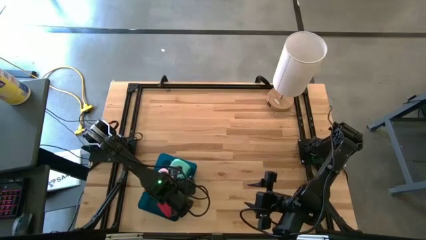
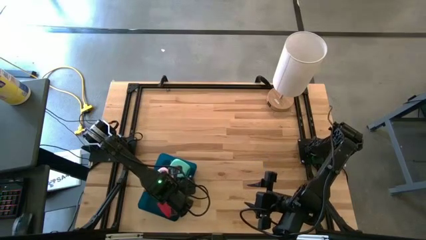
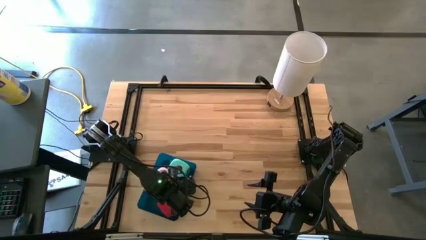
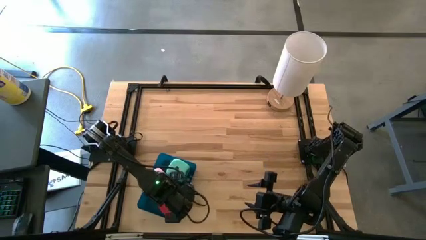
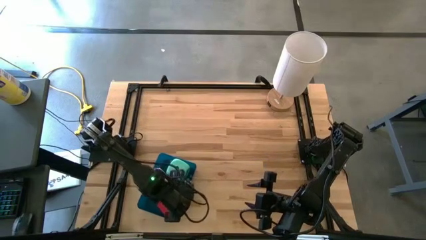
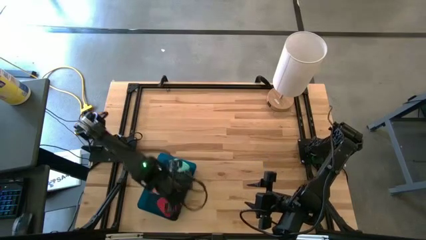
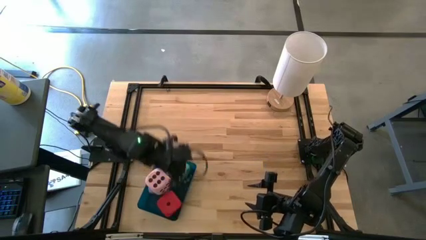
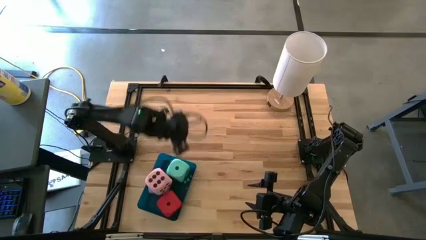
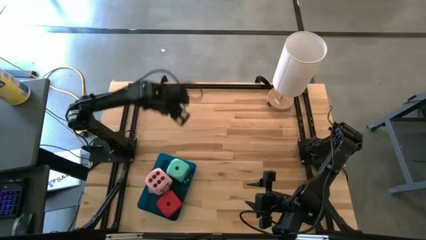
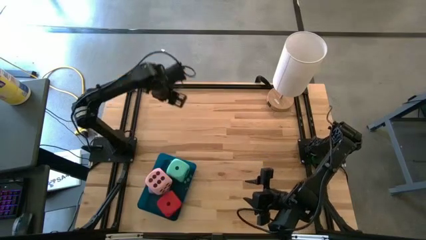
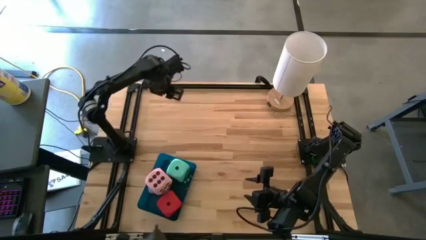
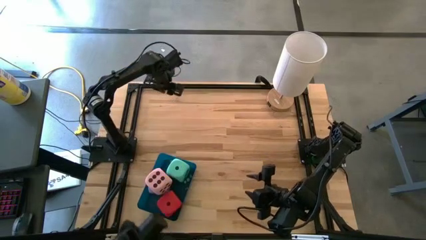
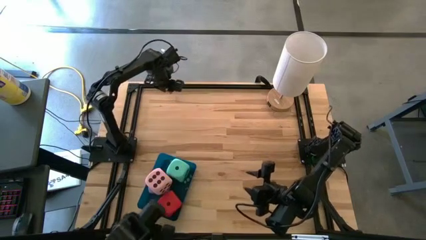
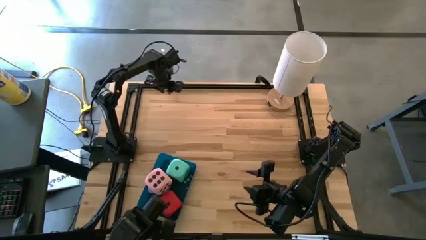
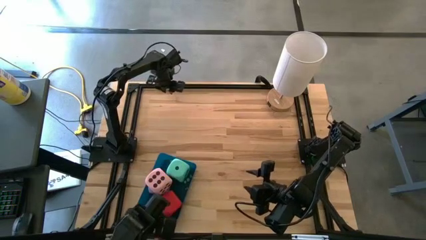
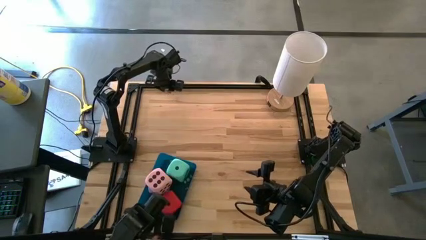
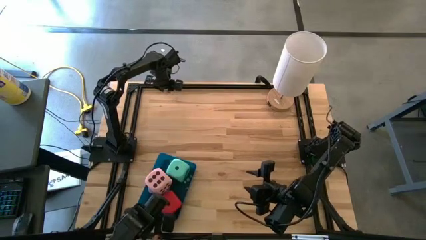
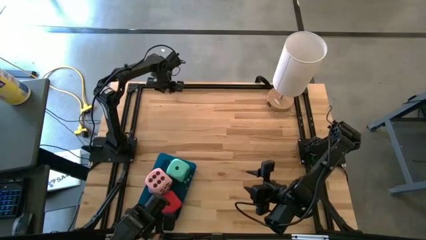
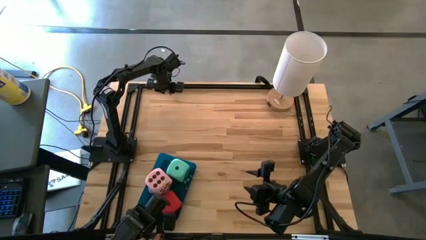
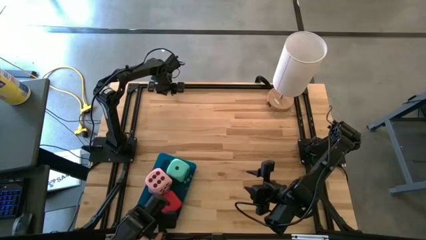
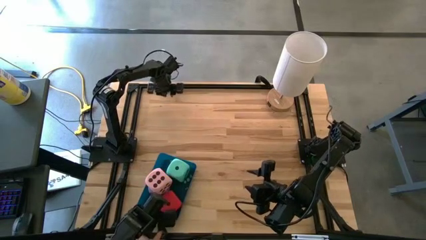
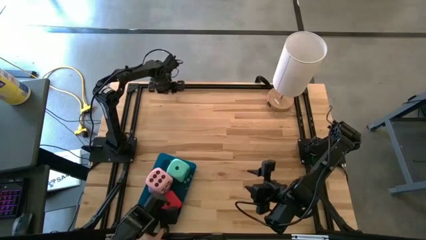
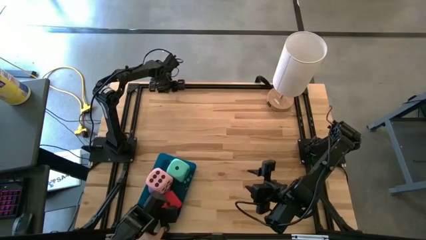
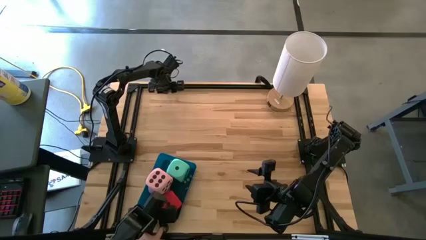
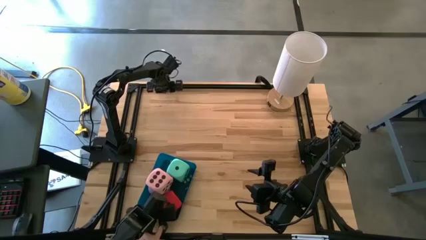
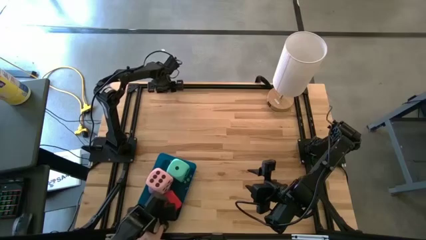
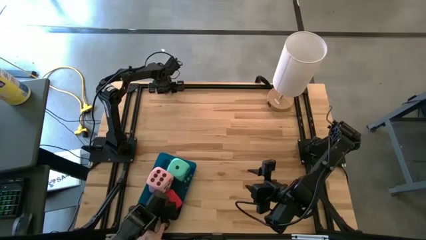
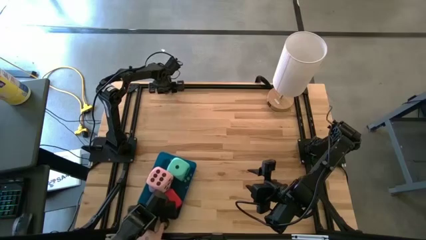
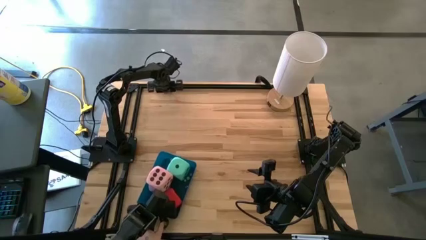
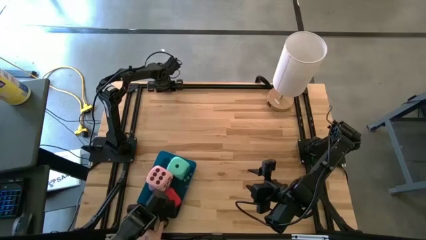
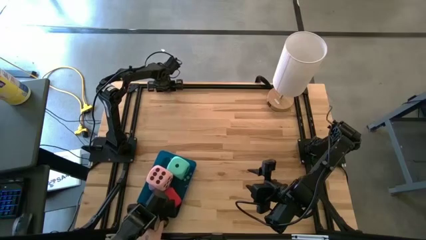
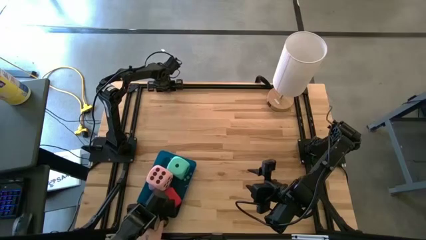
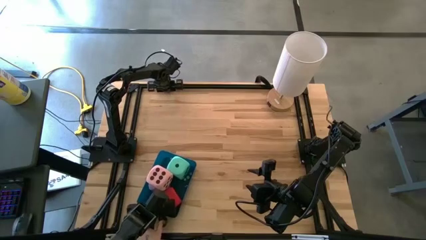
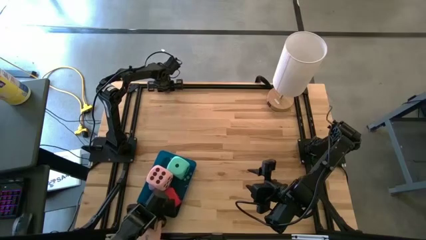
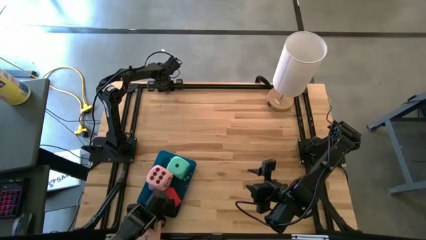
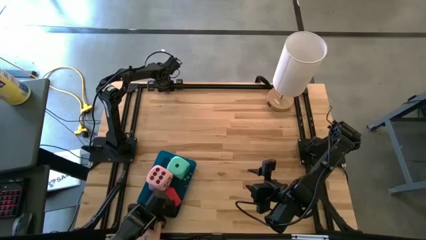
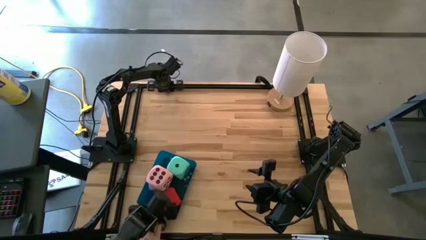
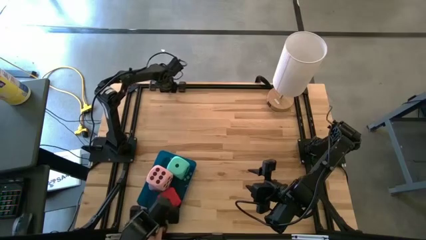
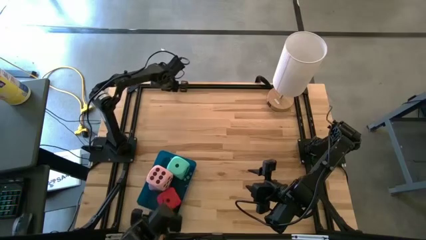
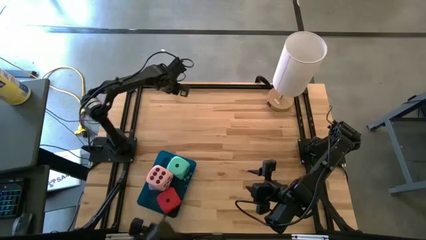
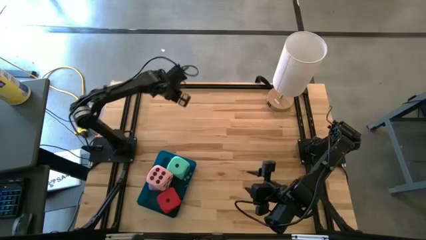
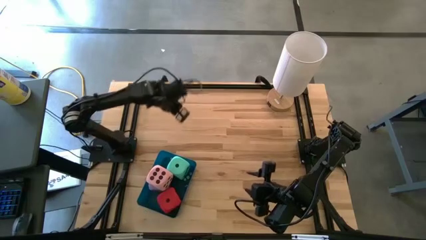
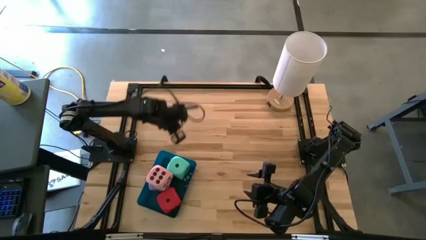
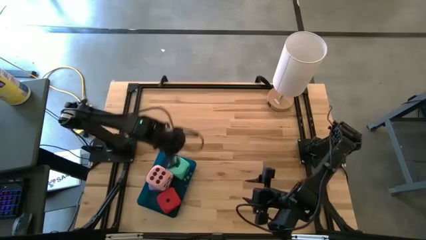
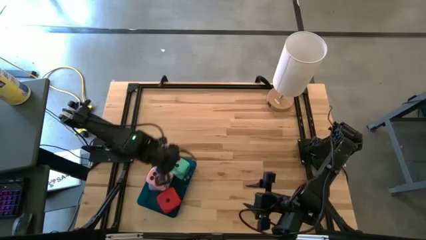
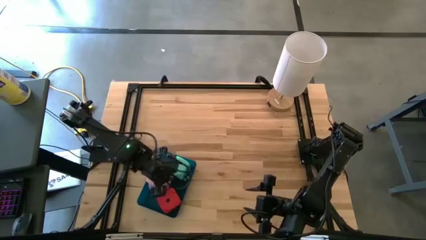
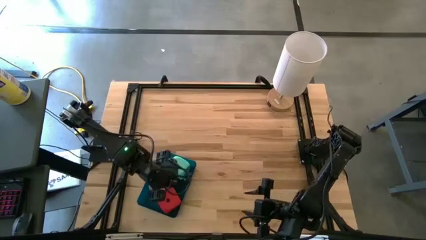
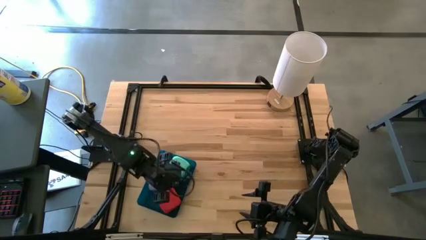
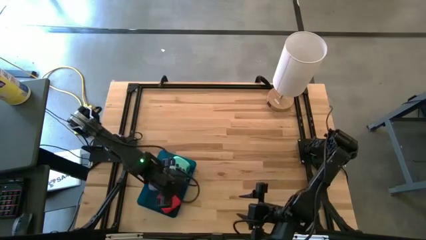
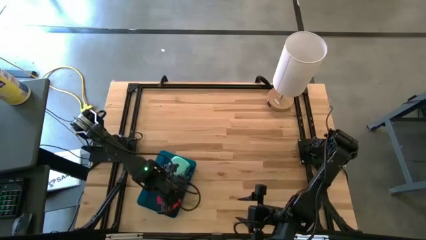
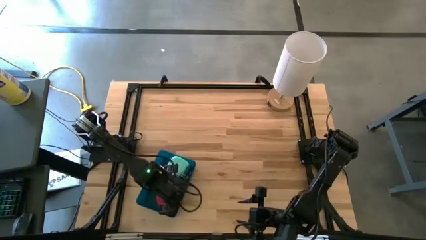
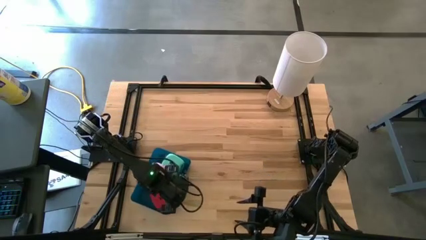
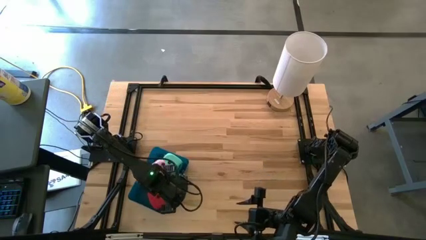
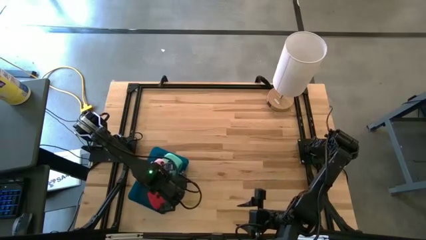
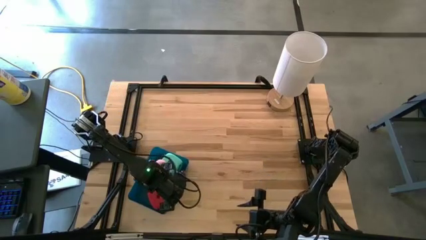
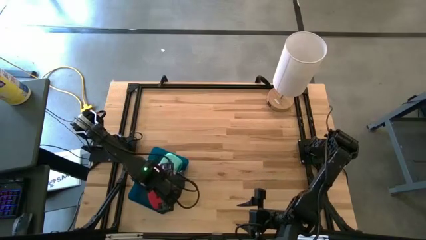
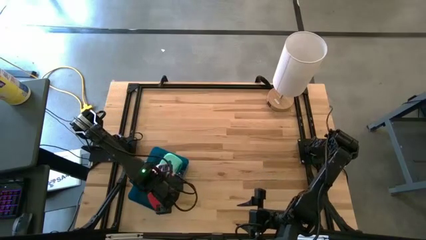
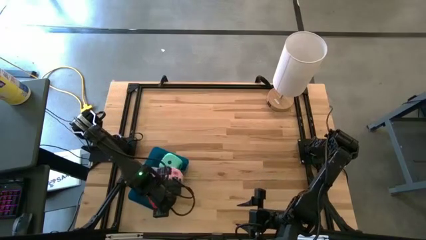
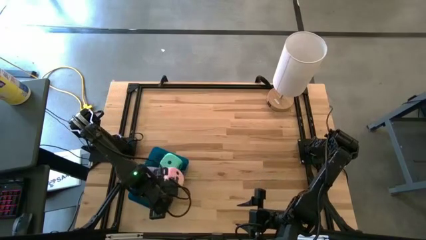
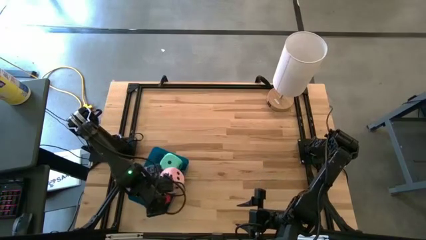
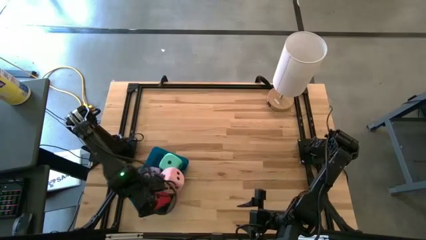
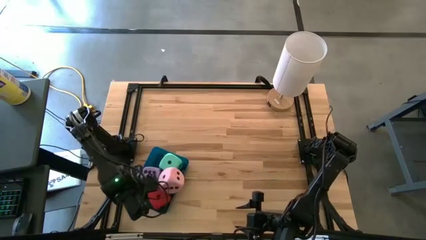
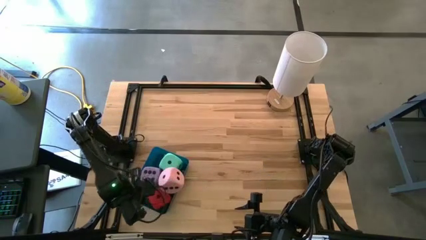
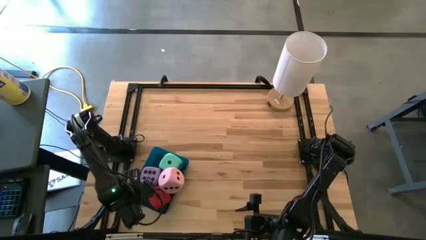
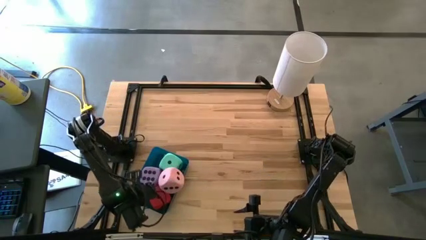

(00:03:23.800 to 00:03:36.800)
Task: Pick & Place Dice
Put the small black die into the blue bin
